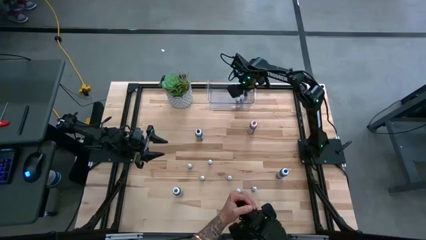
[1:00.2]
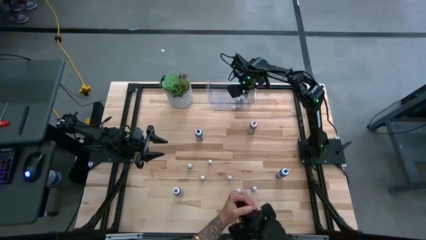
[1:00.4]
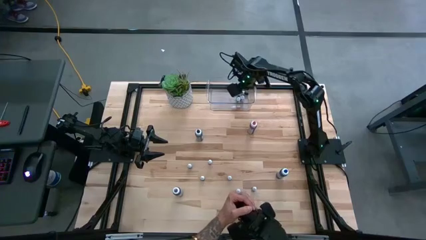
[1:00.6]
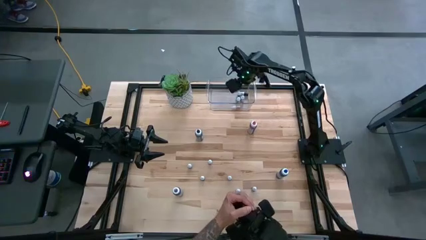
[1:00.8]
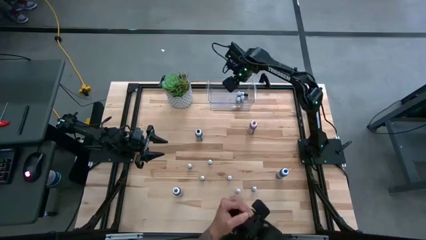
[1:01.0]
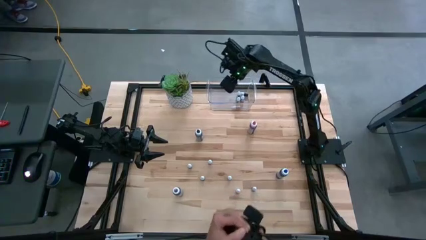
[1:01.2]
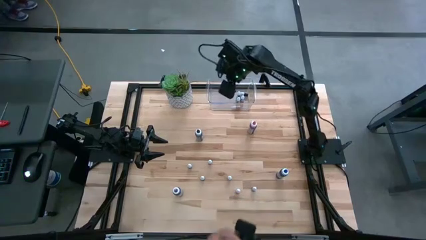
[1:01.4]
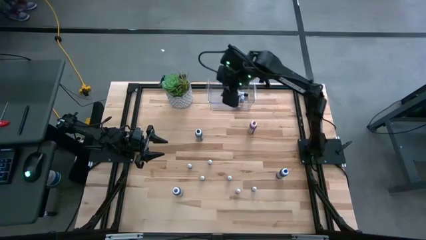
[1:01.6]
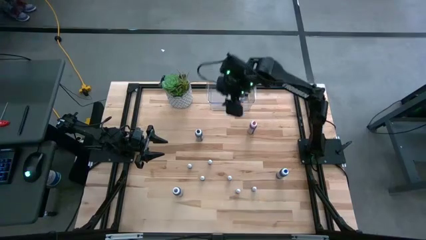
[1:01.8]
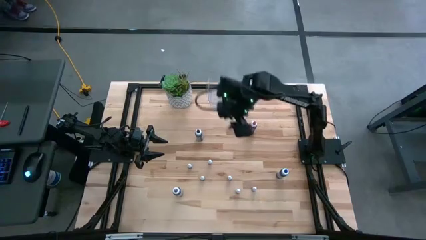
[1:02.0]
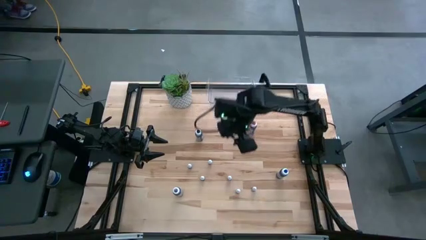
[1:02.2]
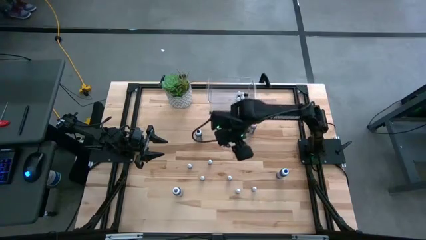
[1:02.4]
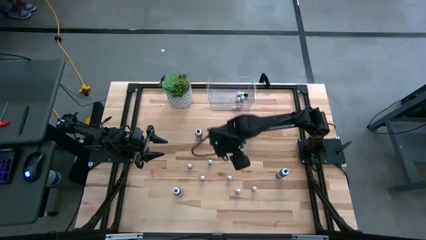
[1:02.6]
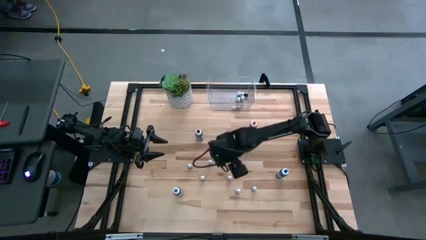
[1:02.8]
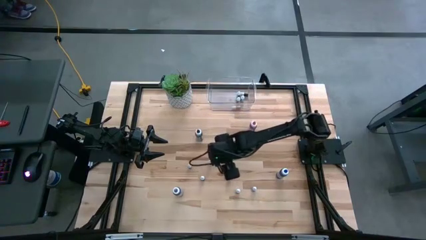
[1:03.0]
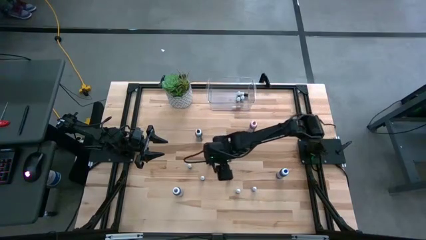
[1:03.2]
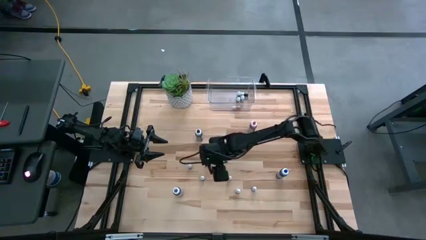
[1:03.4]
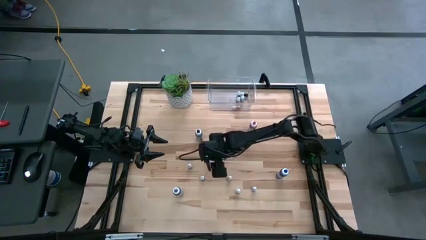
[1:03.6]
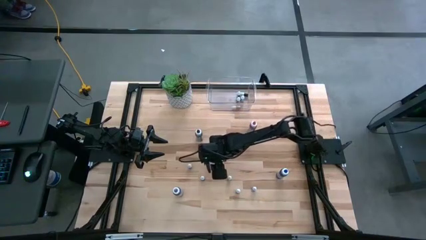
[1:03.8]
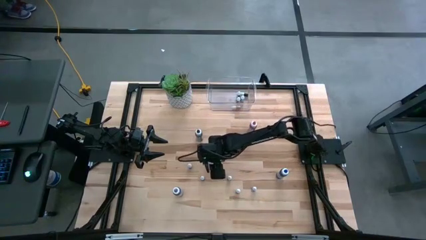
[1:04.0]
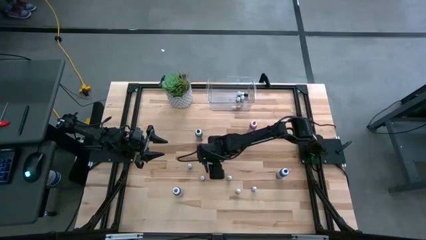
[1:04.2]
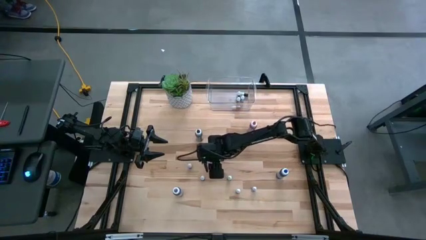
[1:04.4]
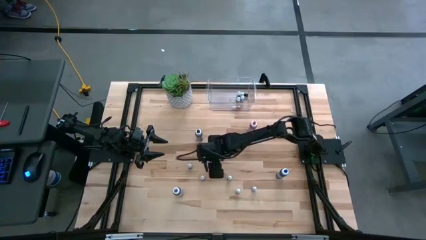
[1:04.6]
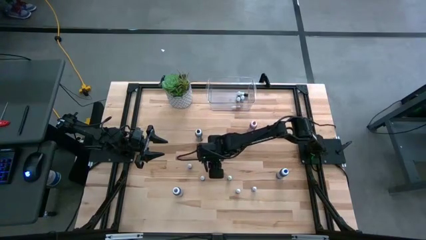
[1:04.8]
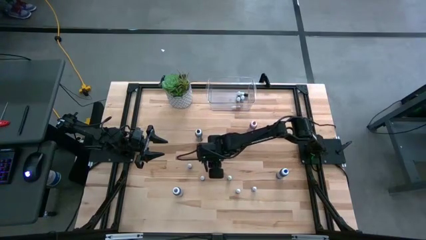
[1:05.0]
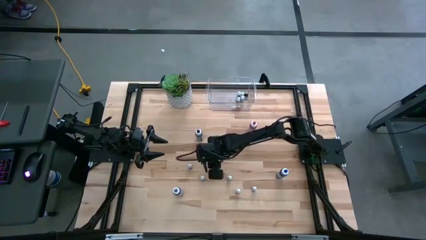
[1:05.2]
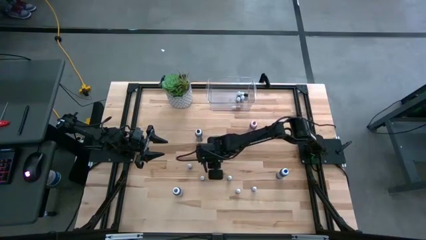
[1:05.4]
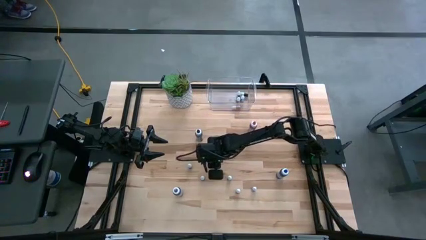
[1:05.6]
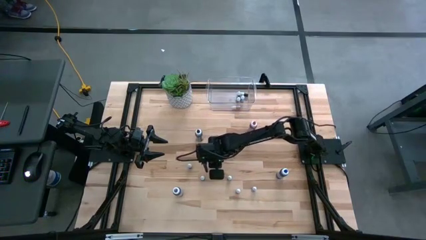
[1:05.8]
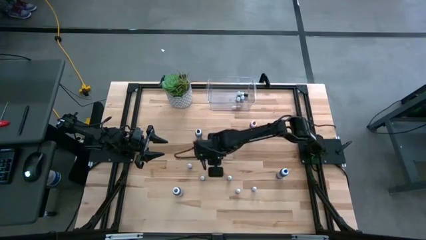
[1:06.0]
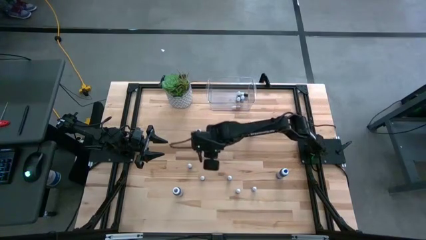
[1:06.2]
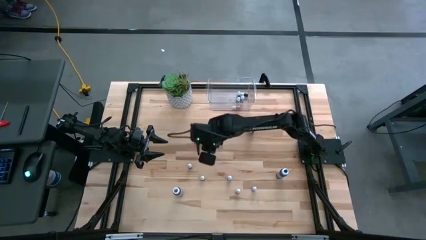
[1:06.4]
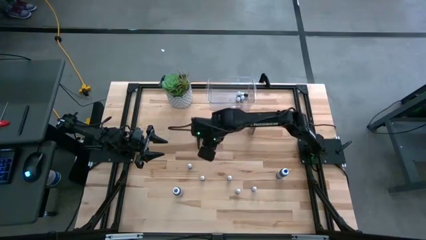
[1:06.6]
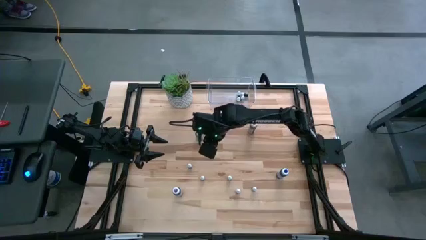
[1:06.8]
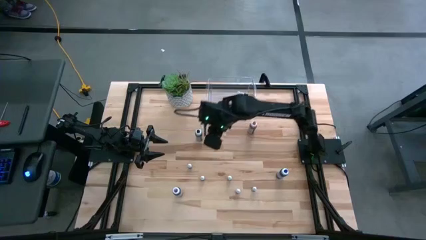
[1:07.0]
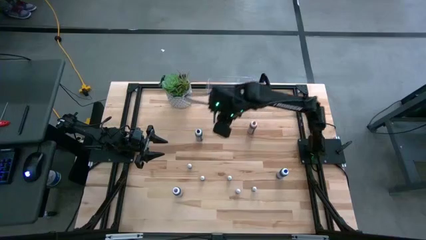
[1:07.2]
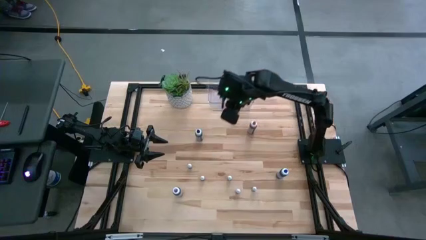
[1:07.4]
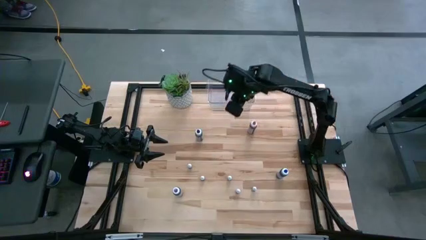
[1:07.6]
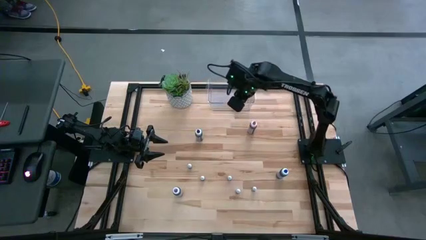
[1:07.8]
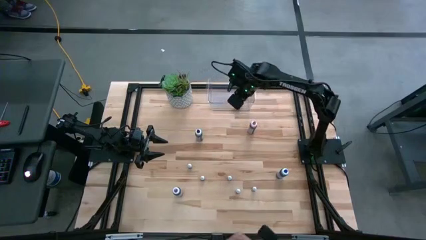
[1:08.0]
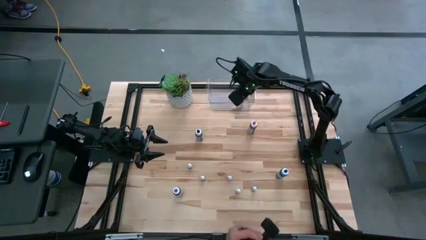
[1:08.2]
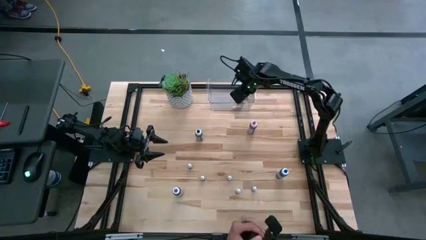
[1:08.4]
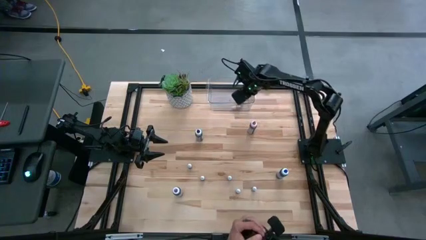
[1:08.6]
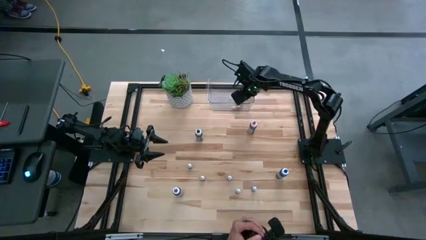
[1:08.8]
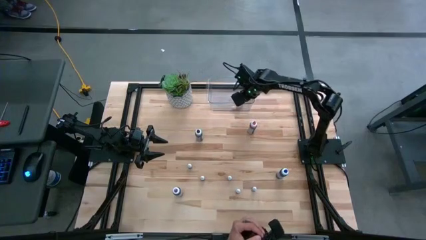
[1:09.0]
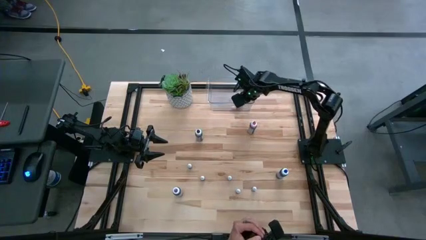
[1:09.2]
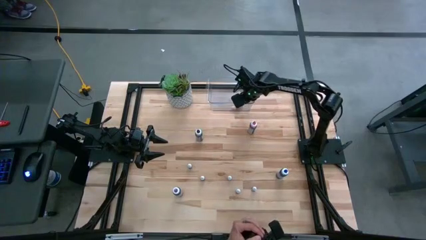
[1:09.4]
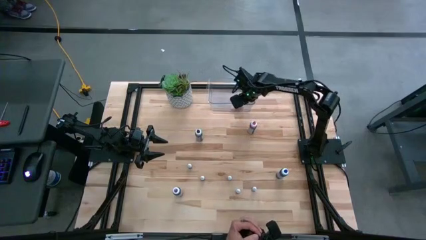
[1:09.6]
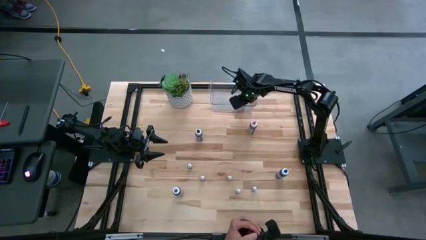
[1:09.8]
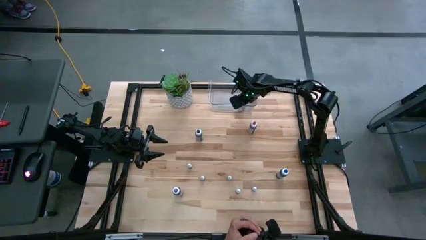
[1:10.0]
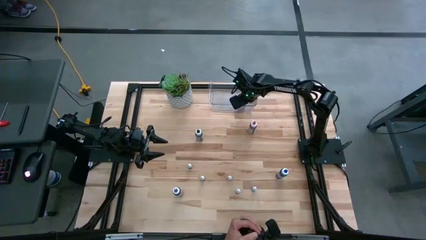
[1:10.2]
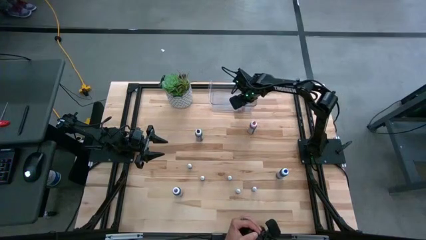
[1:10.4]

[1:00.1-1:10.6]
Task: Pick & Place food coloring
Put the small red food coloring bottle into the bin
